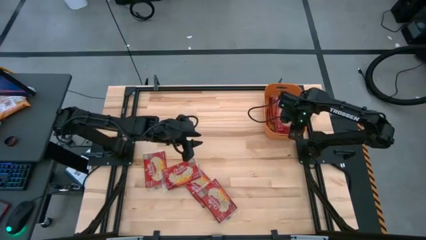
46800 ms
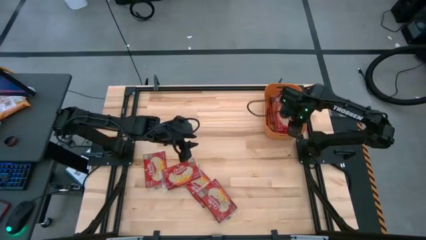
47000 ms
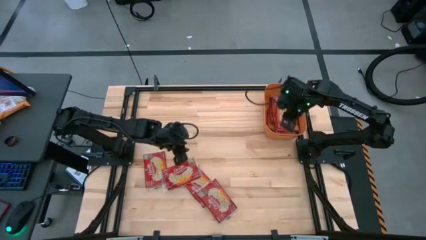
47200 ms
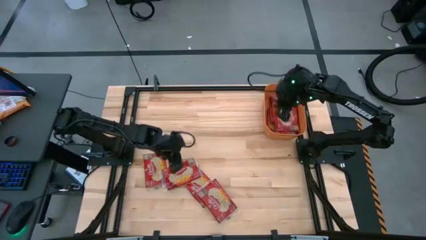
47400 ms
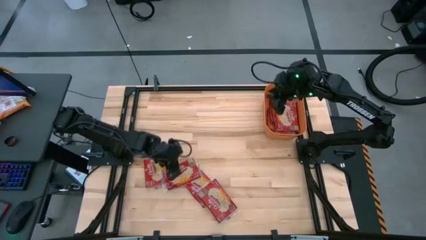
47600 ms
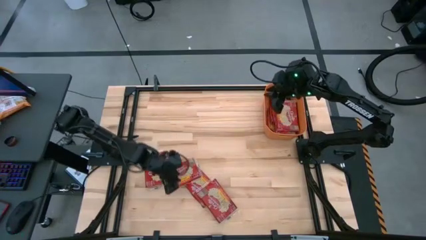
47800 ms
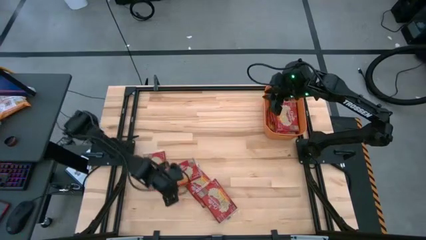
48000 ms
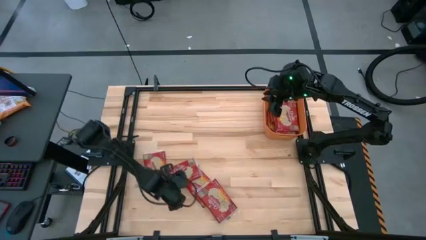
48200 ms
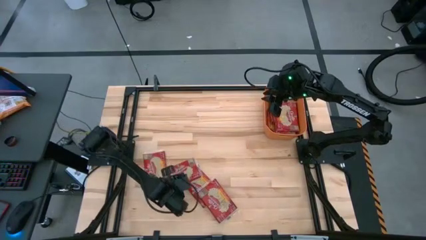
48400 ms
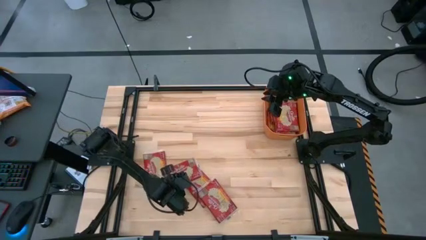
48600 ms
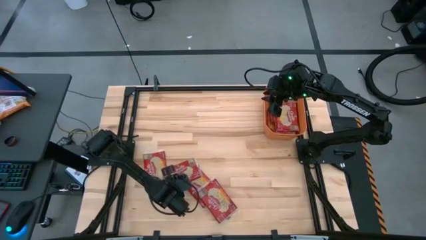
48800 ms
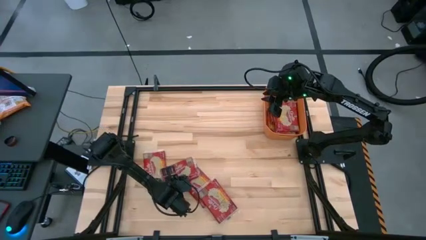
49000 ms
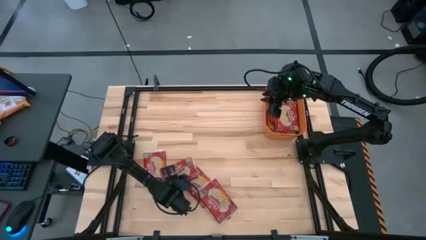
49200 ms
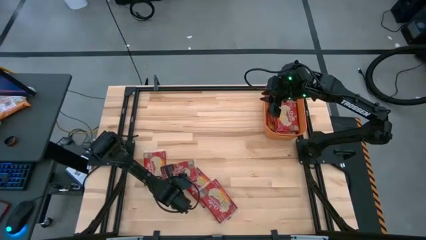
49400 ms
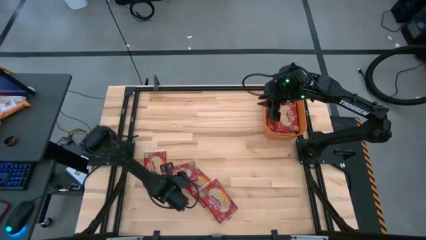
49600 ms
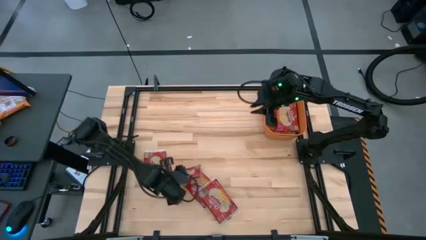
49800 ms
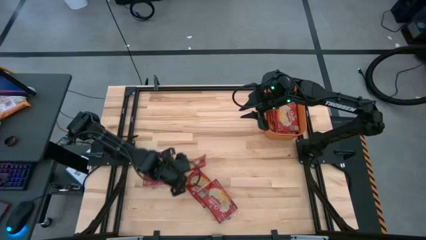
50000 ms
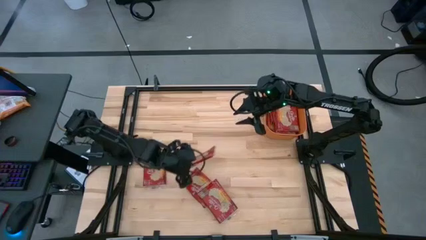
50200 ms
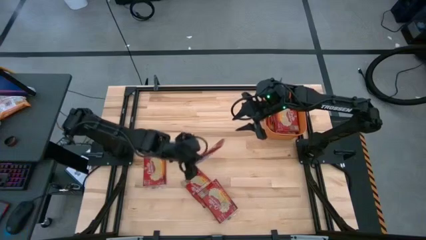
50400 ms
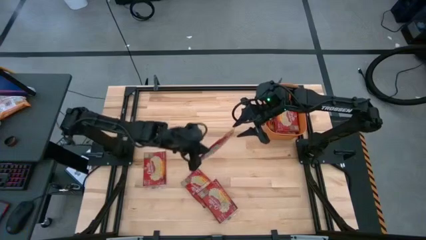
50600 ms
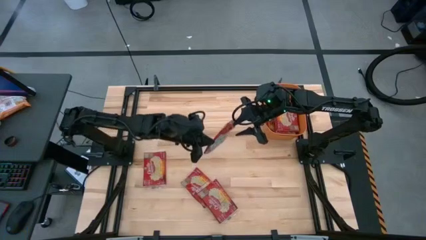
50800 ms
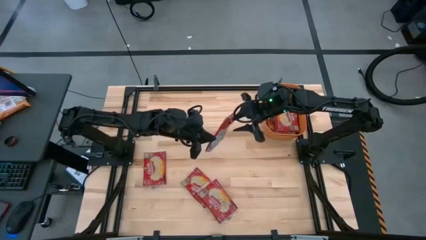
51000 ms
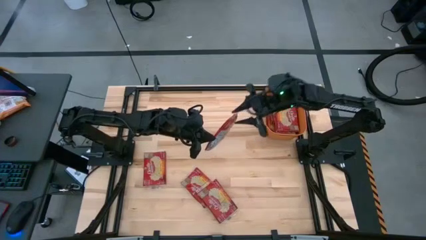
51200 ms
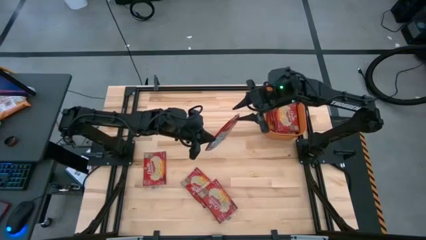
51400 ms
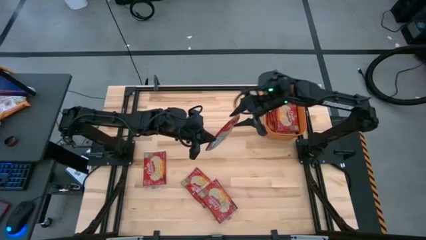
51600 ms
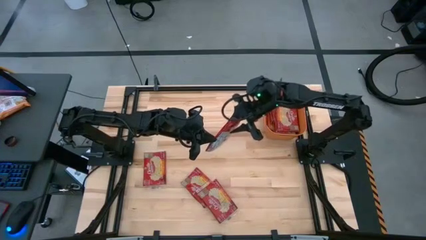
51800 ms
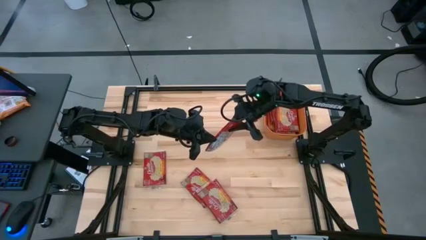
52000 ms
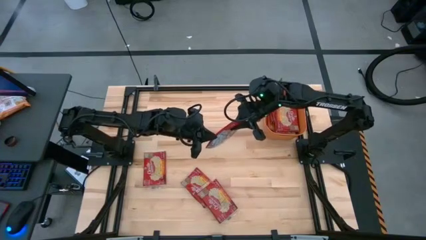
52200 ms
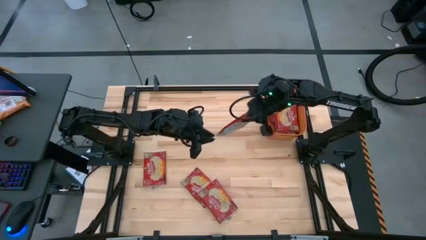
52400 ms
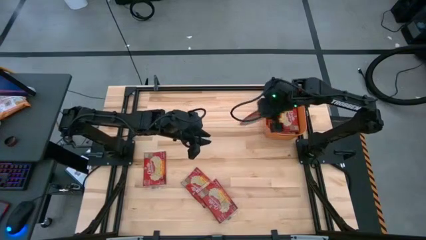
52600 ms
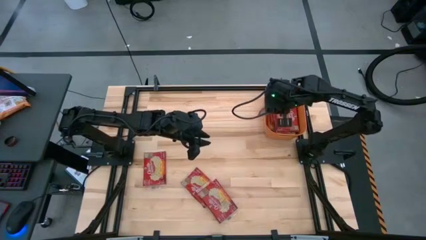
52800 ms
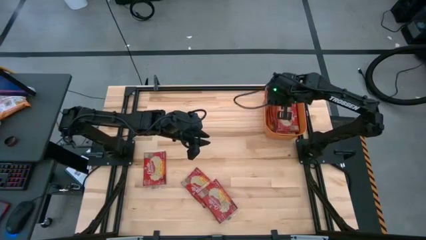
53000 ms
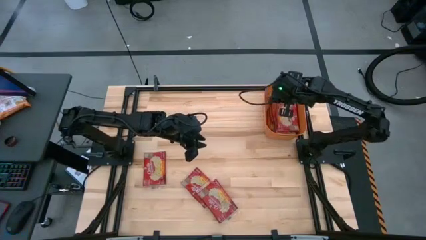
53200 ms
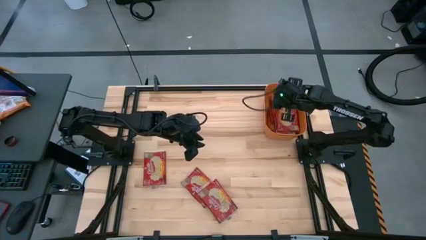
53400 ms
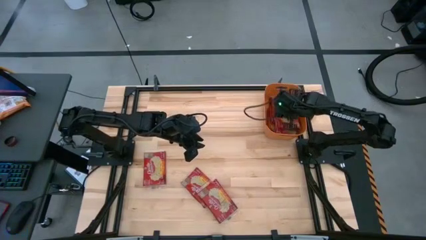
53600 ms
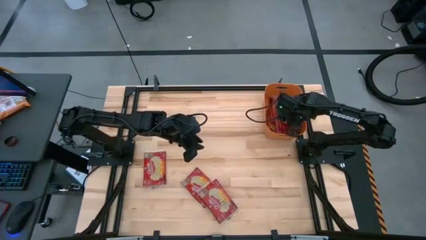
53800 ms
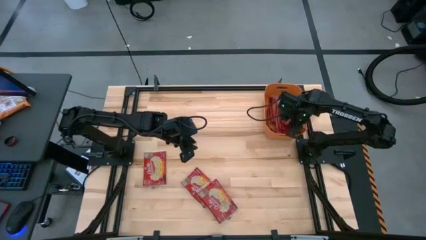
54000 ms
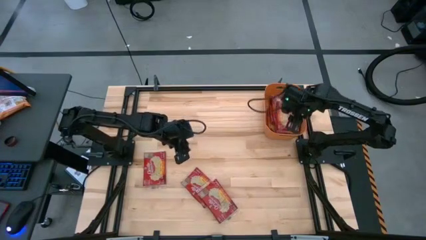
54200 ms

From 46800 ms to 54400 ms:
Task: Sort popcorn bags into baskets
Stack the red popcorn on the orange bin

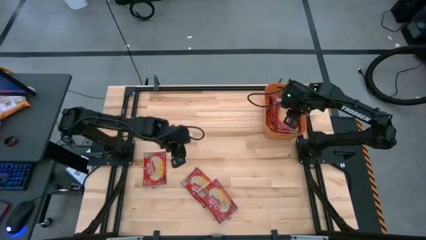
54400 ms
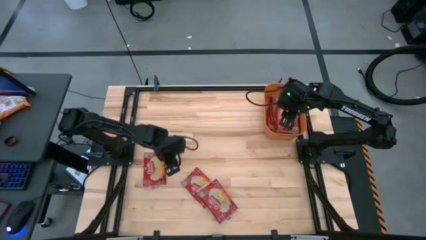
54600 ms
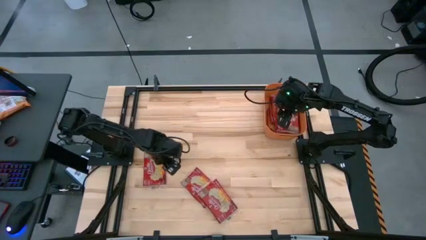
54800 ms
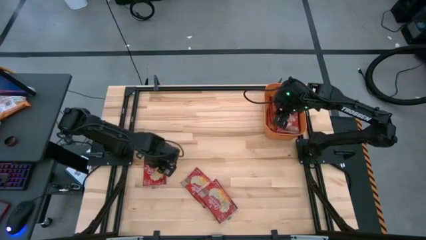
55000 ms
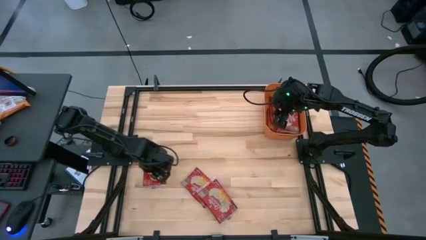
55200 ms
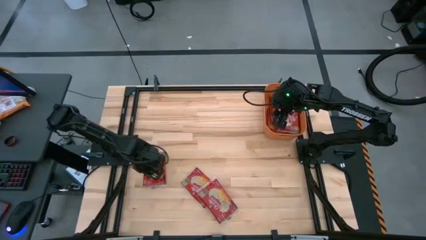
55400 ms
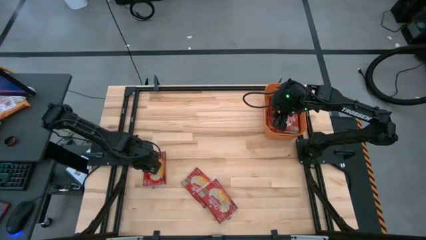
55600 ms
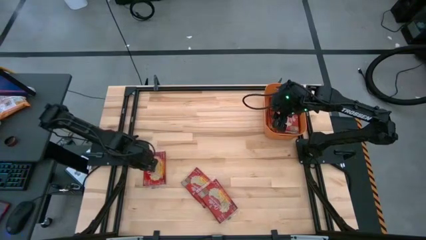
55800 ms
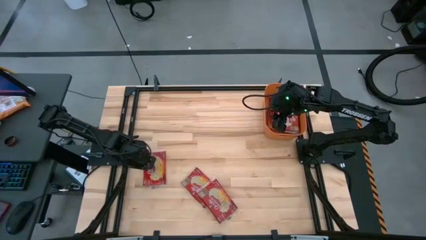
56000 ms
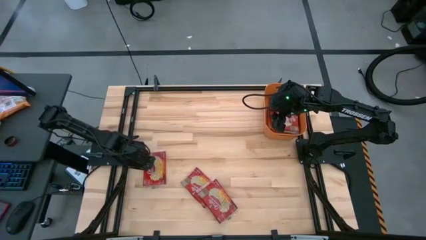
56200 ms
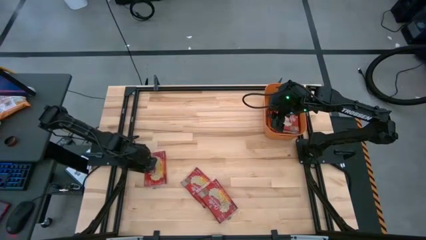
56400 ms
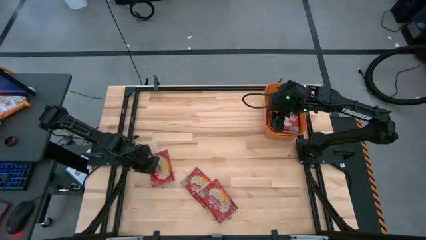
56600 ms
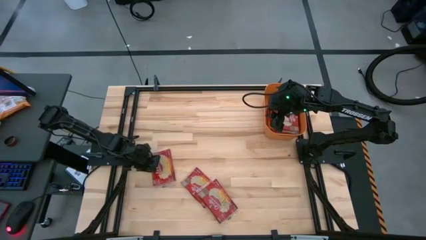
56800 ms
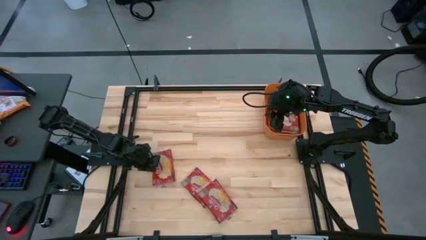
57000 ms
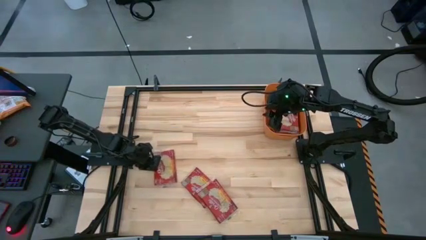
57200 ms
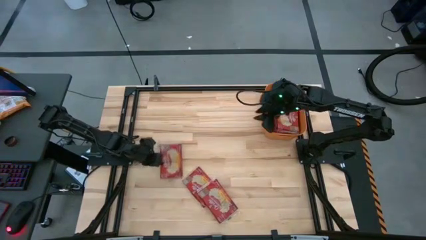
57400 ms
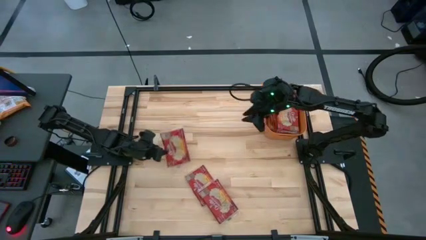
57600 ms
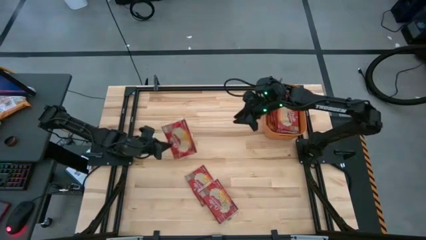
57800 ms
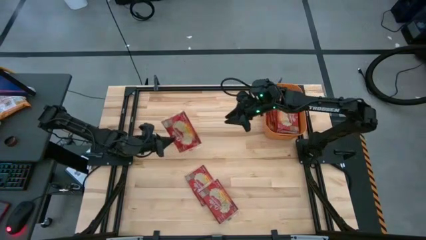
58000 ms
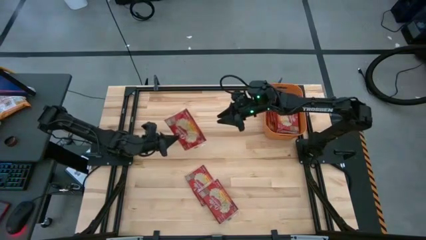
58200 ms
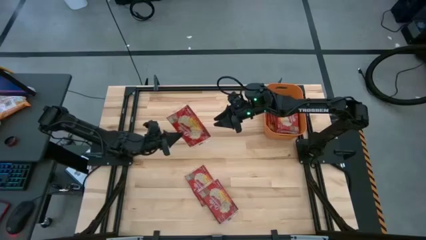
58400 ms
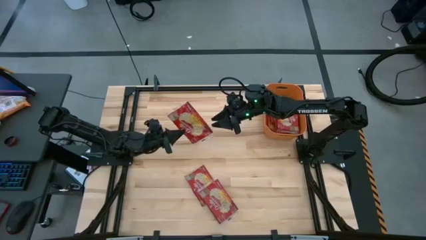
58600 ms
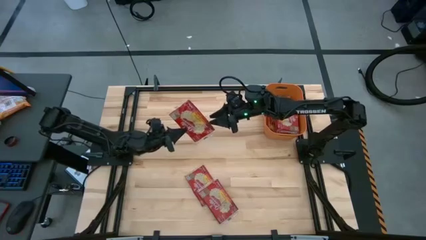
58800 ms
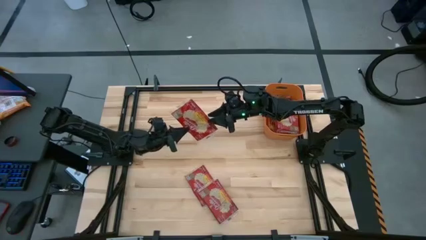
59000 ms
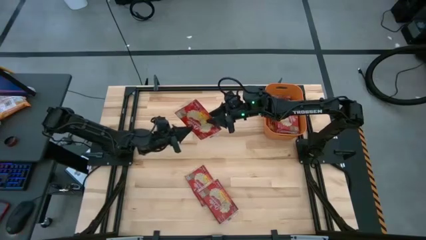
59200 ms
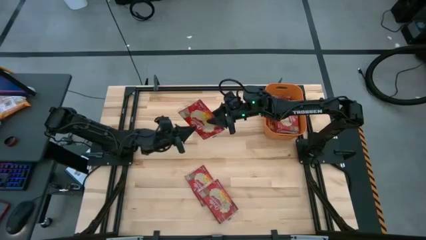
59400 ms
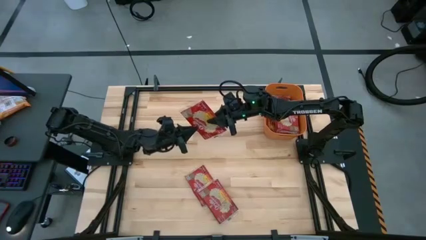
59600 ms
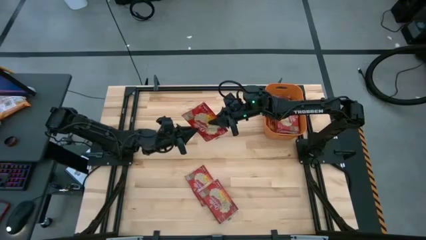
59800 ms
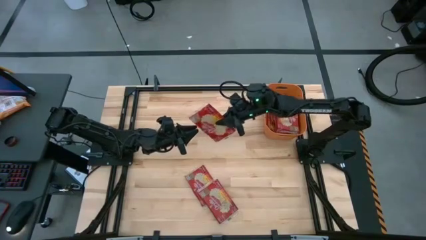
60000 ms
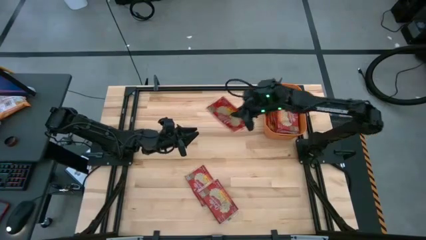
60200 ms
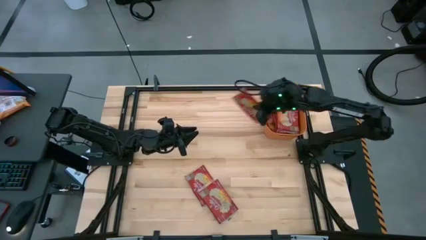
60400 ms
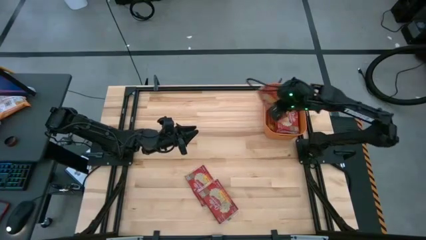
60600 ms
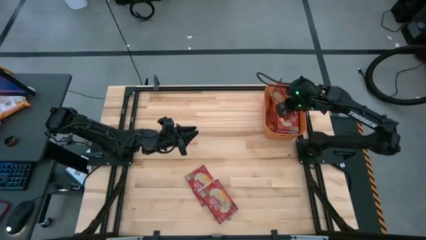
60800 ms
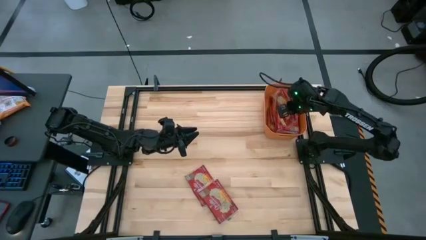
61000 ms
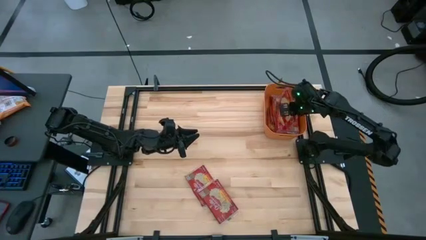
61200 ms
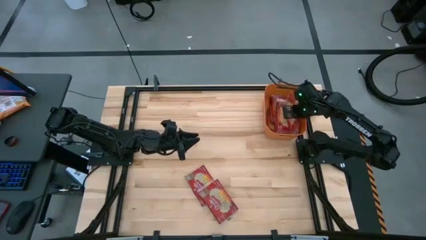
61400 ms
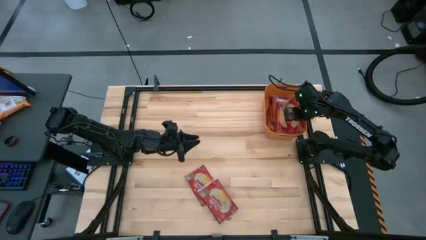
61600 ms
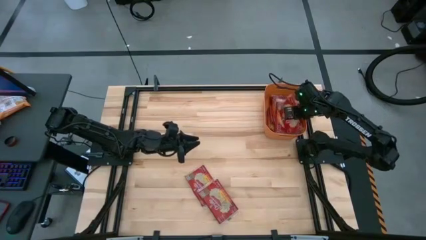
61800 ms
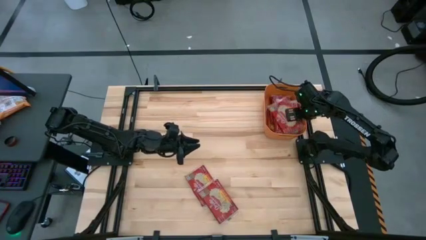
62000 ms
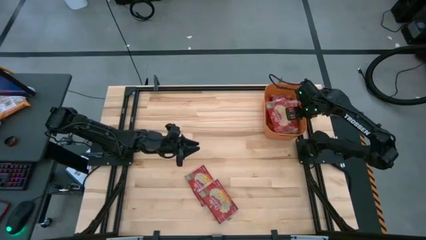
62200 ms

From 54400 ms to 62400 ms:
Stack the red popcorn on the orange bin
